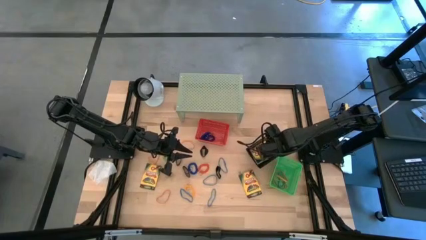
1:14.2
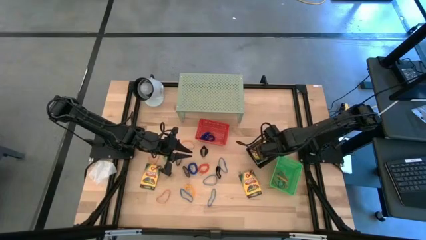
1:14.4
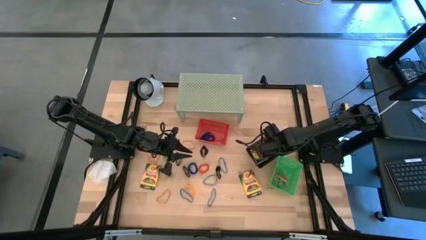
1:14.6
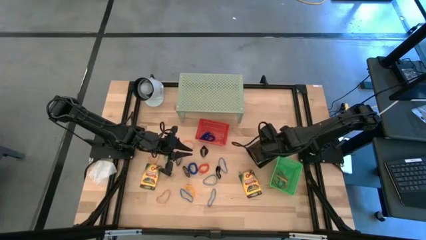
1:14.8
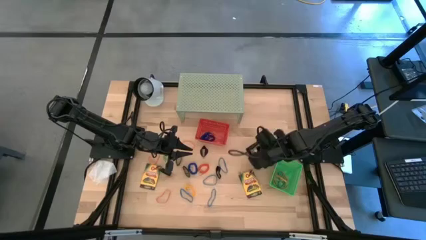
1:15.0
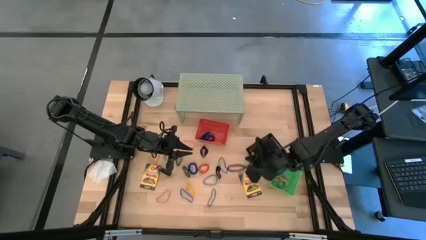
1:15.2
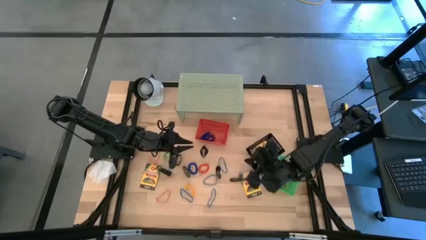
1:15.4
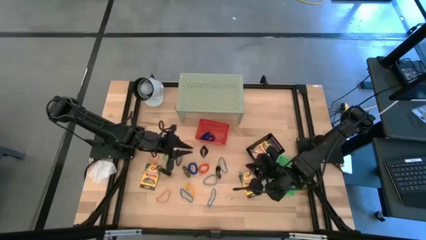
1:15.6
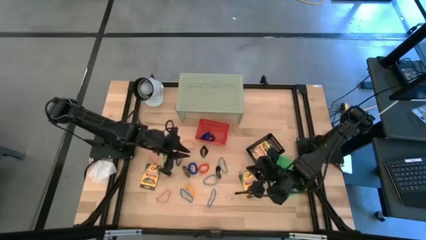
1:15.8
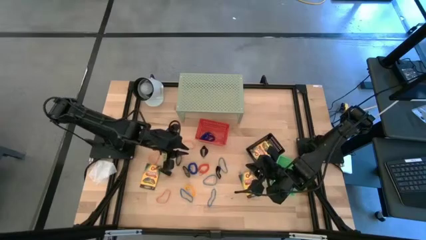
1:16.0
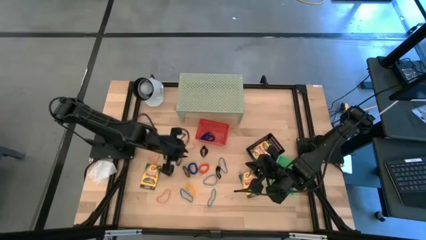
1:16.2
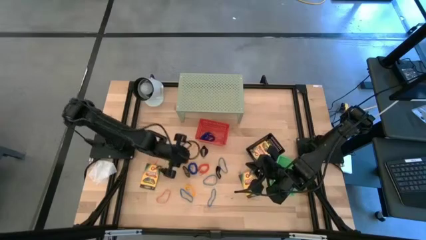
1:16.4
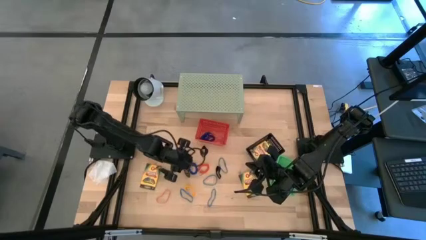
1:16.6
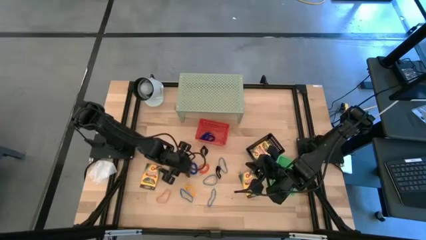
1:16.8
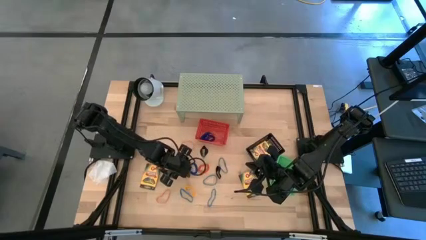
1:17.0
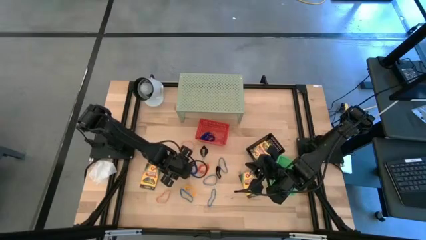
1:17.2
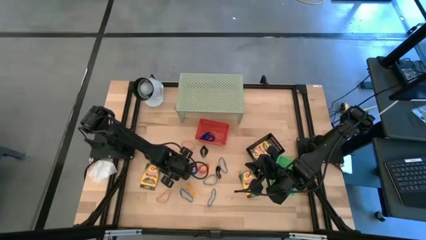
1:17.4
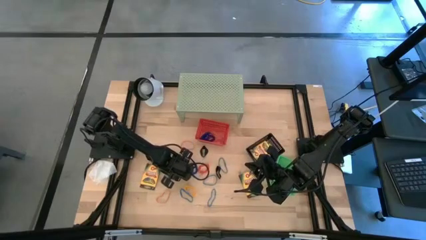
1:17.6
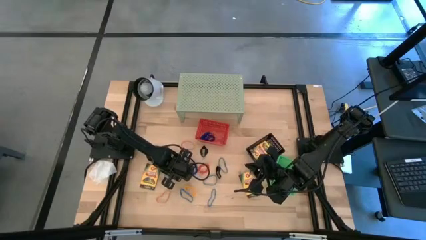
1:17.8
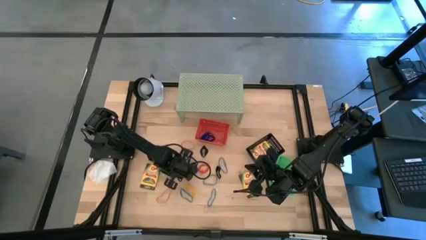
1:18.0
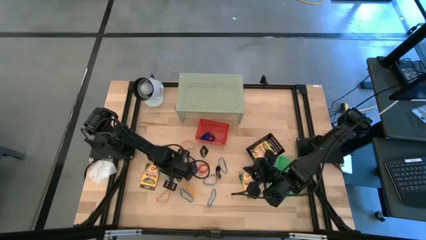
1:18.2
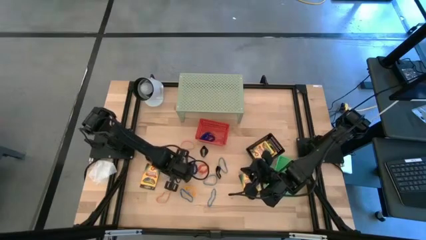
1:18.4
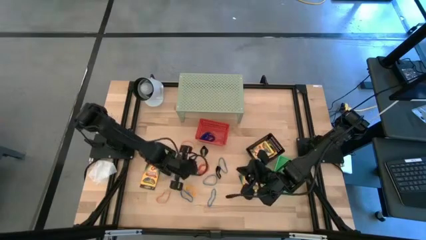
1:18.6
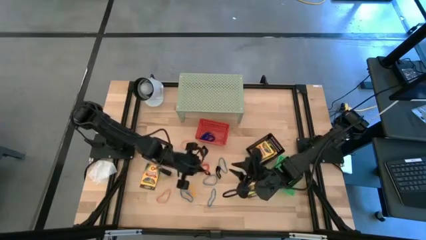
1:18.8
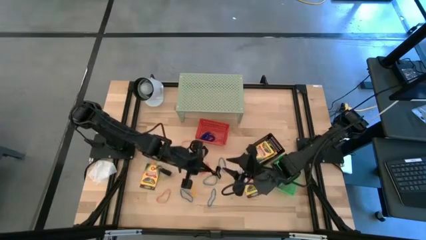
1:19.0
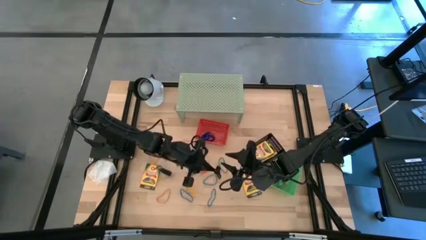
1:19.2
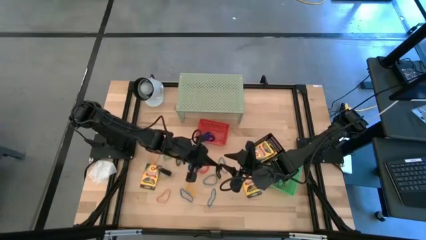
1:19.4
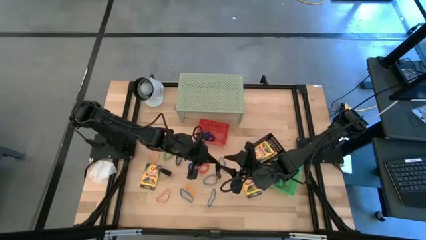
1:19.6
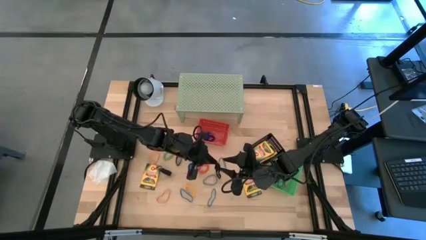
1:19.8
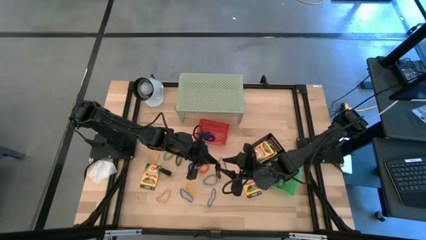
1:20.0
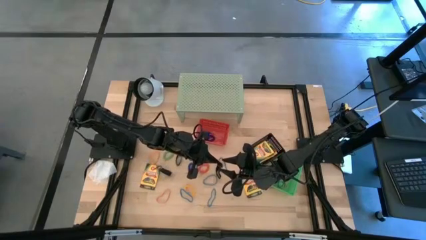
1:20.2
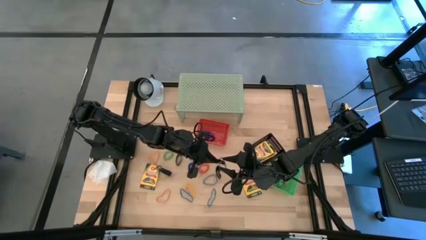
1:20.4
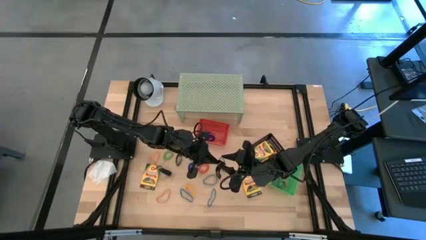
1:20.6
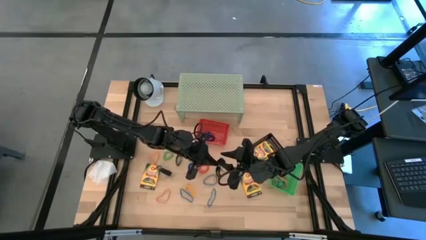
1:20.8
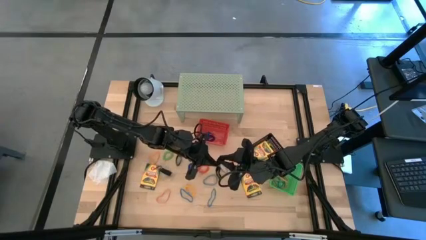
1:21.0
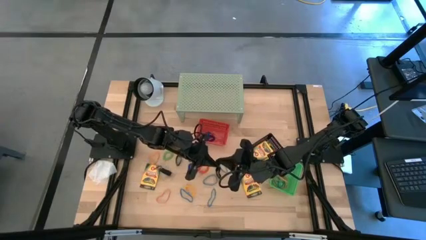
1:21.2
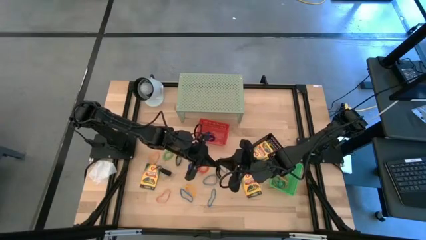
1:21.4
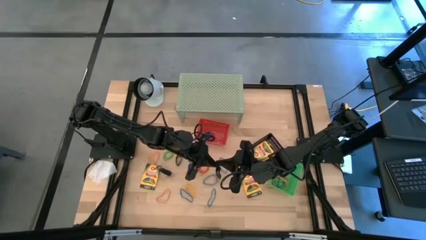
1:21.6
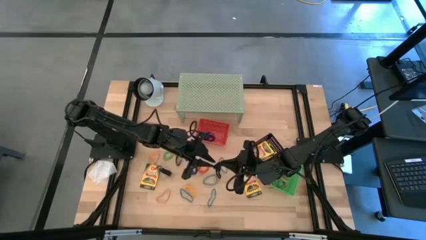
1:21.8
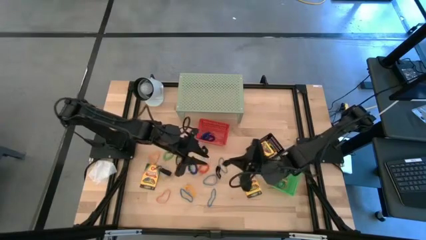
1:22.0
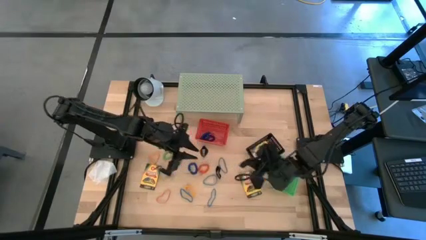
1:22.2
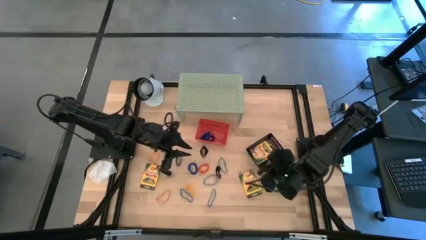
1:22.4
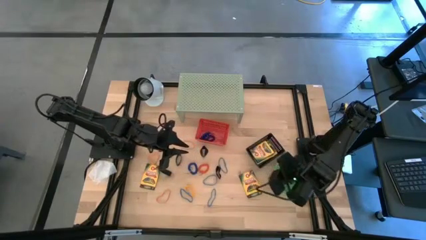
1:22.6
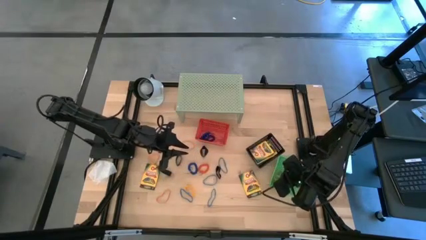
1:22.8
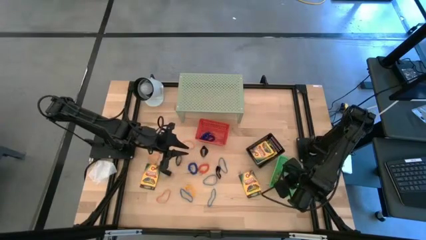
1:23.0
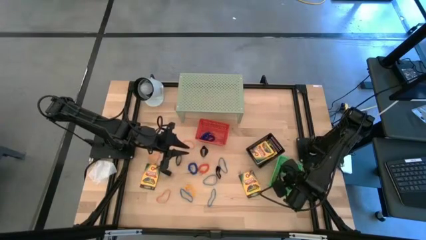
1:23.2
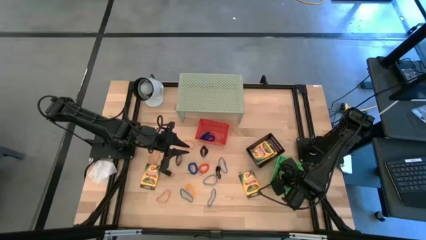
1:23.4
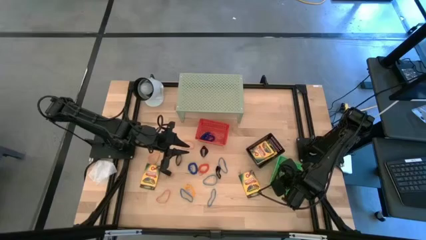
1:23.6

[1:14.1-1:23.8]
Task: Pick & Place Office Desk Supplies
Put the black rubber band into the green bin

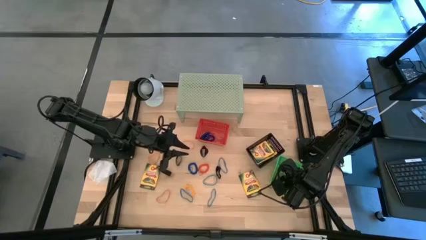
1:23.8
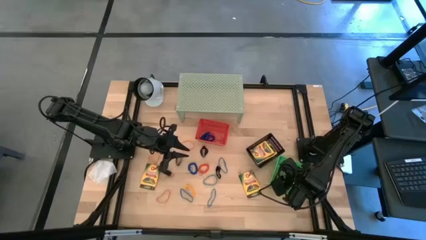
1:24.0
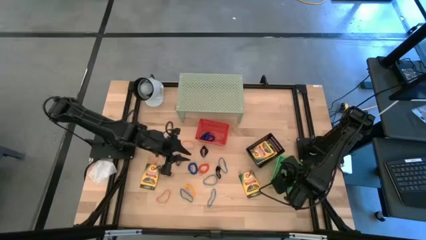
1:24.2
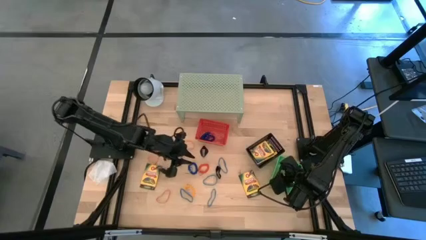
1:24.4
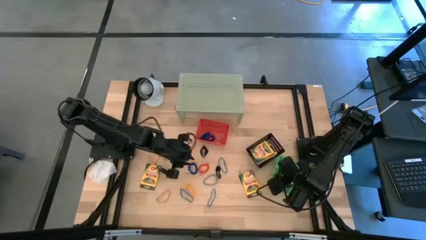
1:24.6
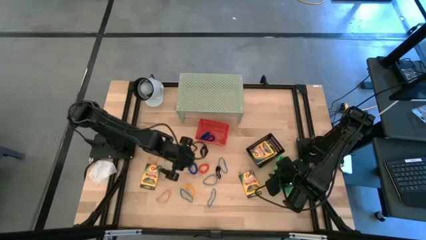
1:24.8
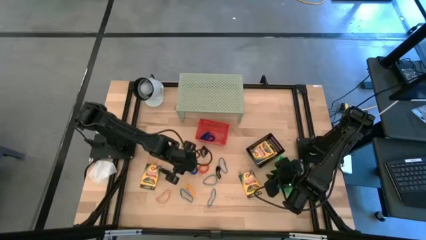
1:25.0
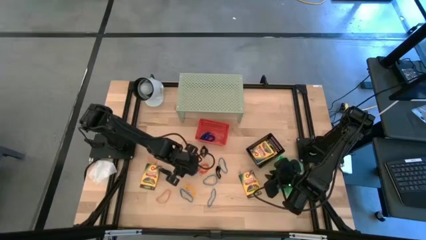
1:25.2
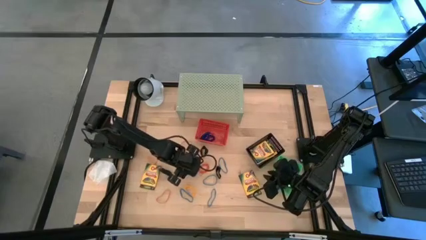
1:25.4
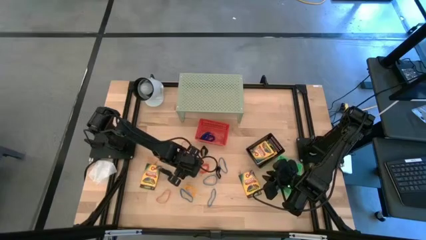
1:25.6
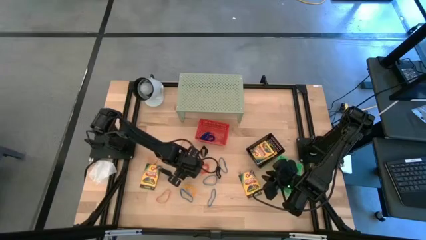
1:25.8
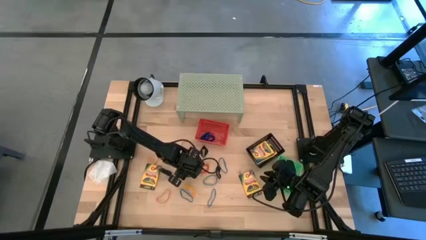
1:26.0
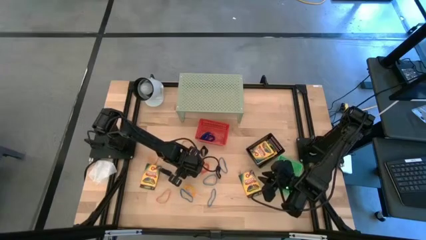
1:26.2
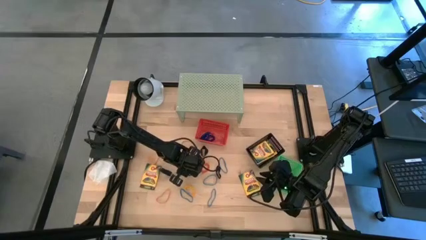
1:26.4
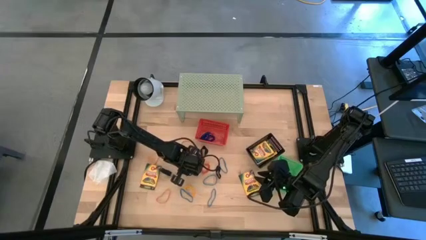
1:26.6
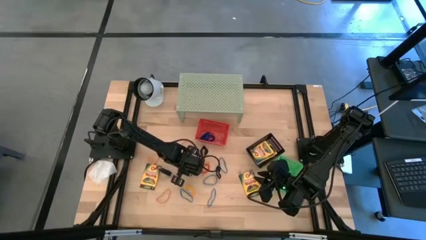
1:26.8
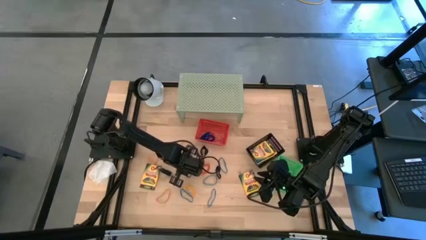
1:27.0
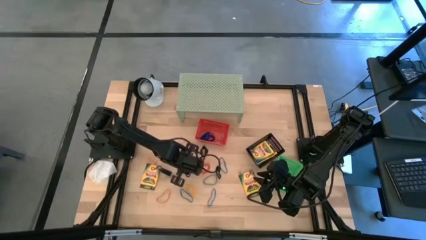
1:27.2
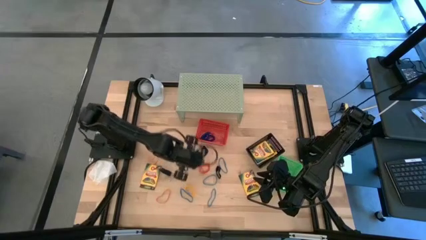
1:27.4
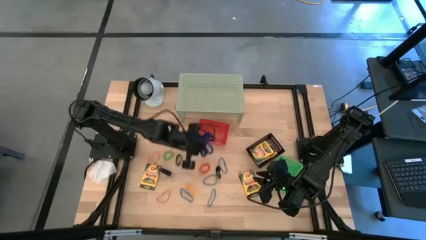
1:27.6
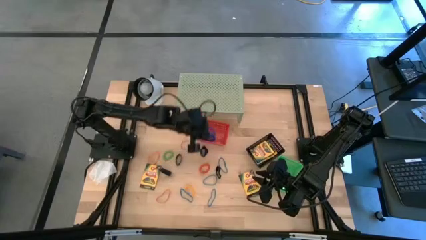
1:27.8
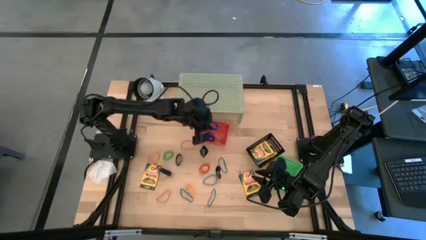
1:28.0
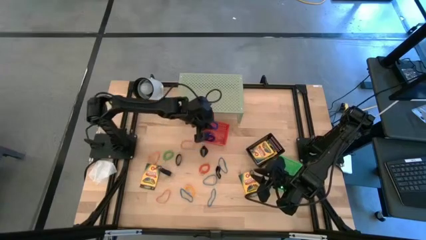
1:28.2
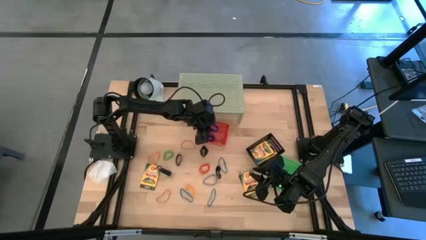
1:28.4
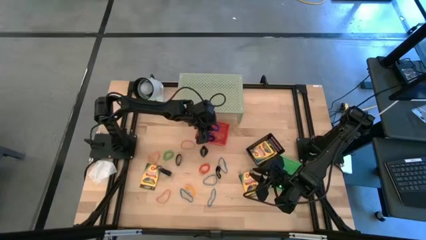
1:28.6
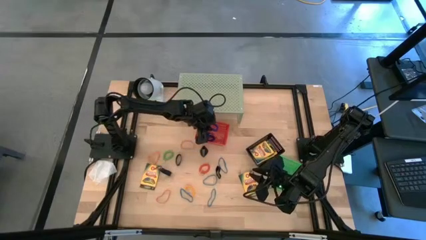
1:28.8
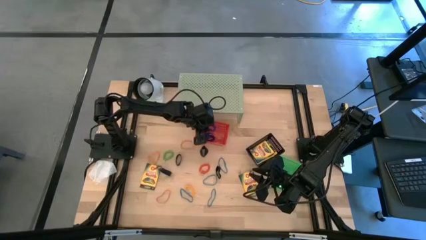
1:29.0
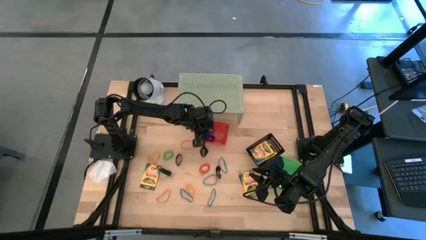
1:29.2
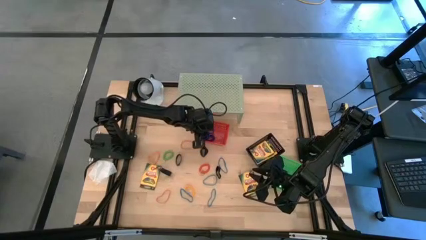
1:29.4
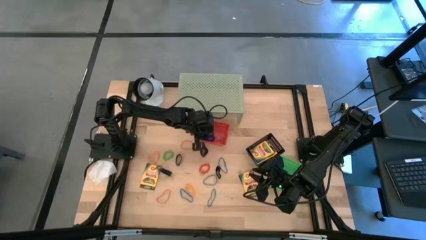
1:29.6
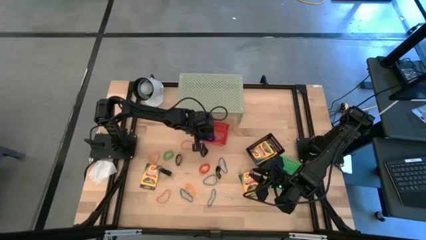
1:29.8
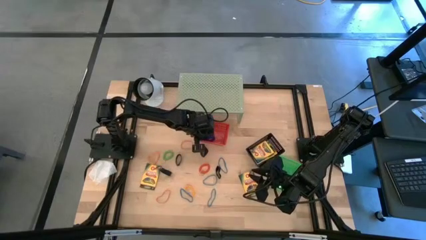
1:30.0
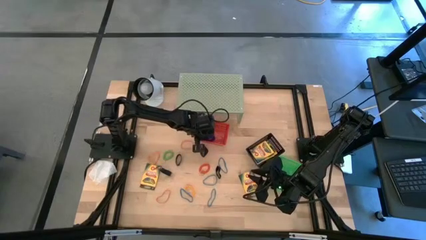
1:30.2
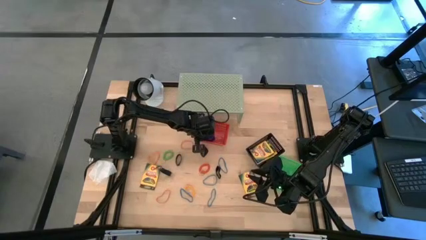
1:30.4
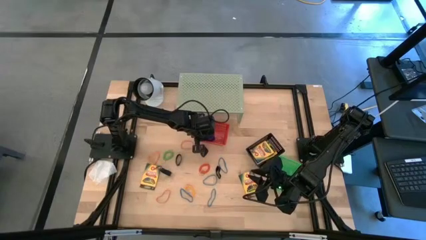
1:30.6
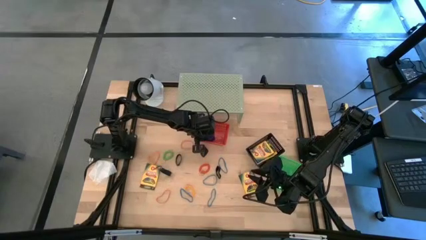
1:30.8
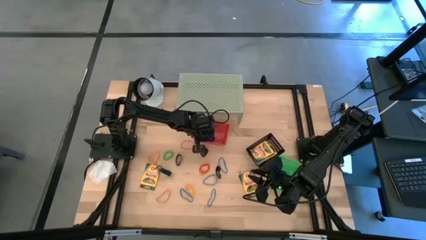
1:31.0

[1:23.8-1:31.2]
Put the blue spring keychain into the red bin
